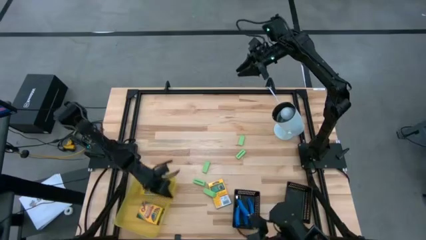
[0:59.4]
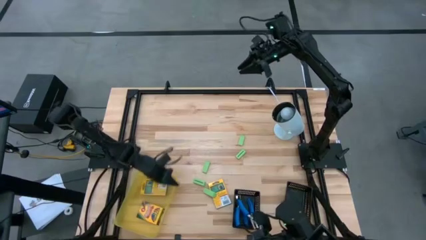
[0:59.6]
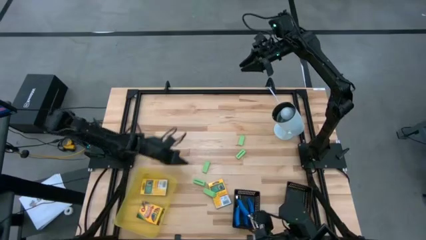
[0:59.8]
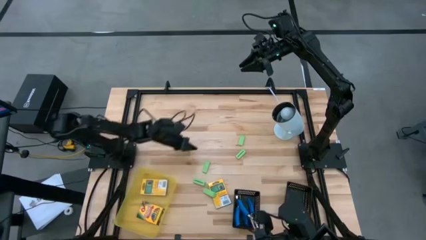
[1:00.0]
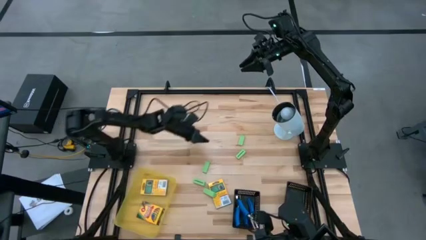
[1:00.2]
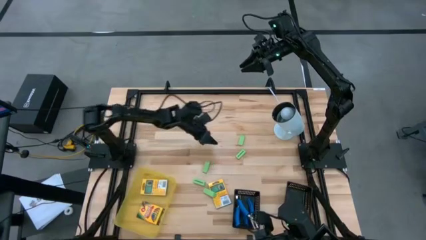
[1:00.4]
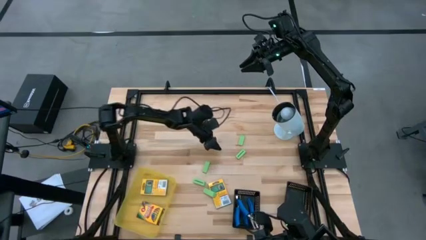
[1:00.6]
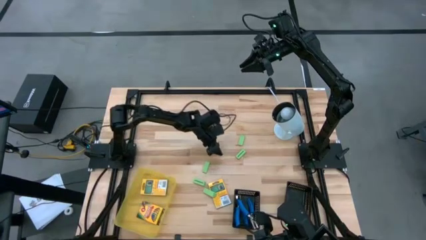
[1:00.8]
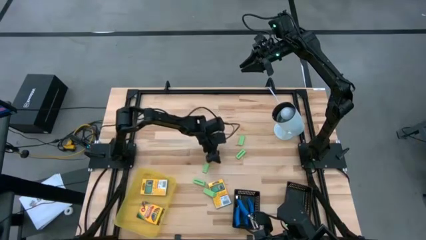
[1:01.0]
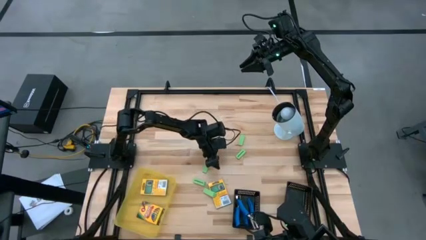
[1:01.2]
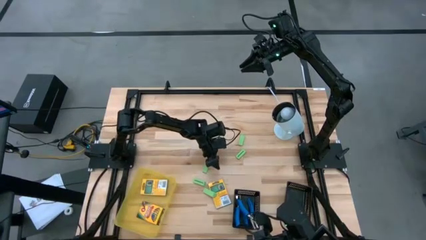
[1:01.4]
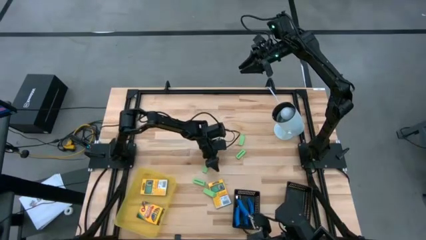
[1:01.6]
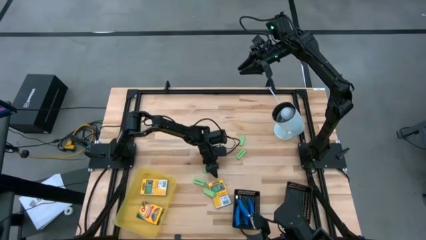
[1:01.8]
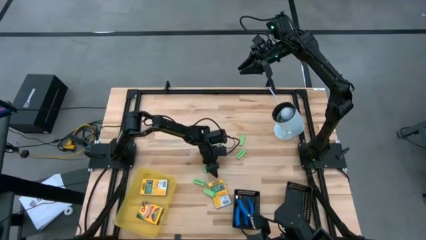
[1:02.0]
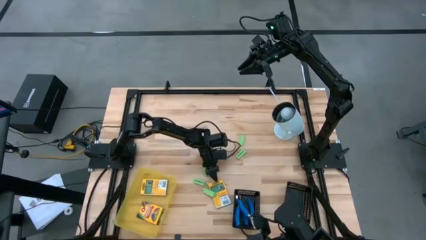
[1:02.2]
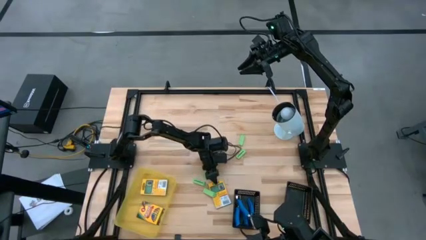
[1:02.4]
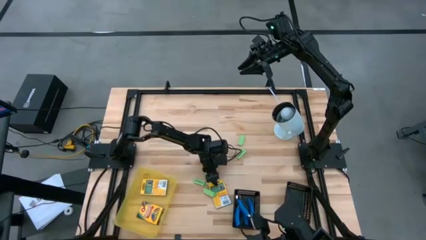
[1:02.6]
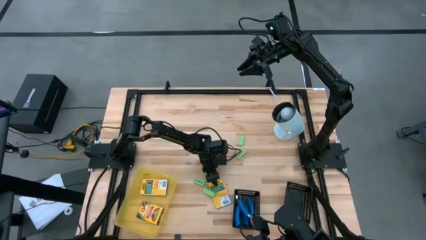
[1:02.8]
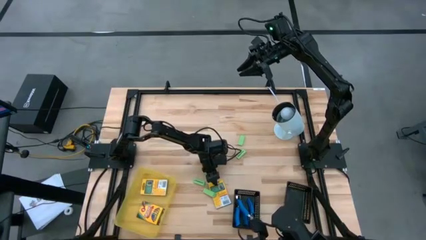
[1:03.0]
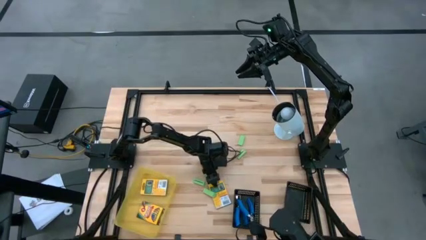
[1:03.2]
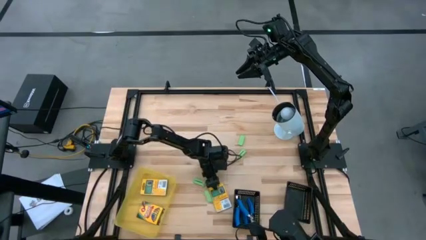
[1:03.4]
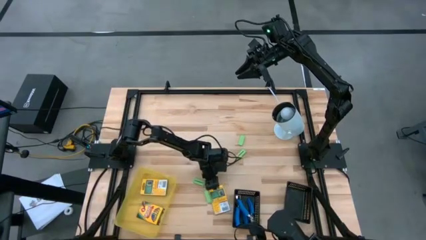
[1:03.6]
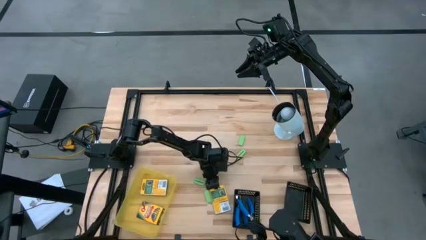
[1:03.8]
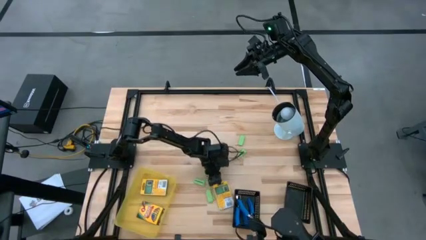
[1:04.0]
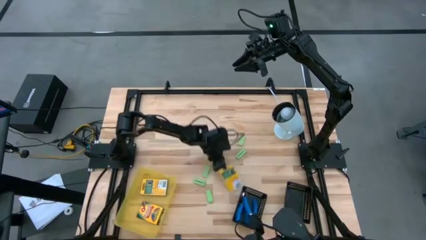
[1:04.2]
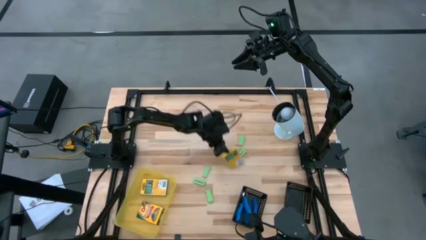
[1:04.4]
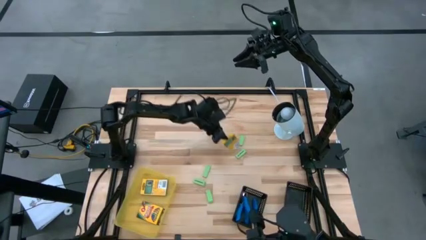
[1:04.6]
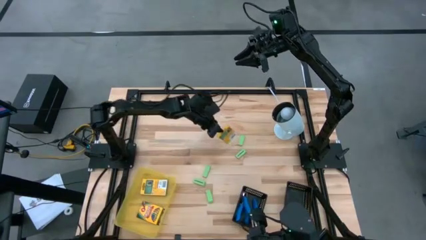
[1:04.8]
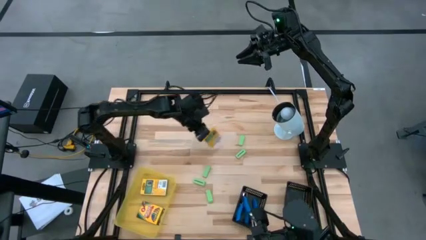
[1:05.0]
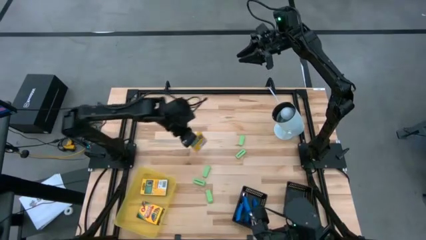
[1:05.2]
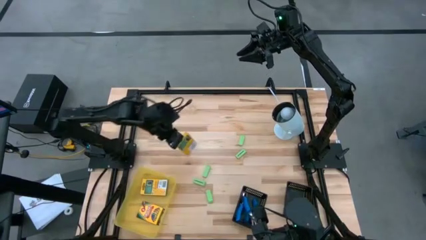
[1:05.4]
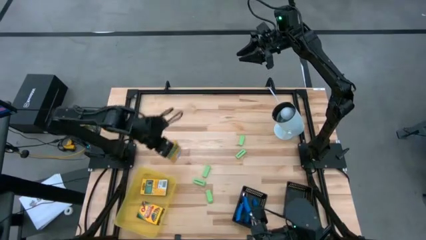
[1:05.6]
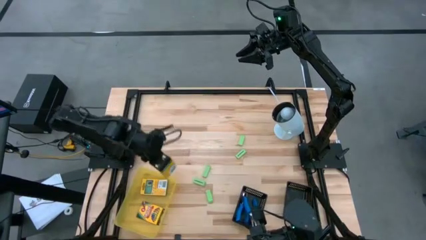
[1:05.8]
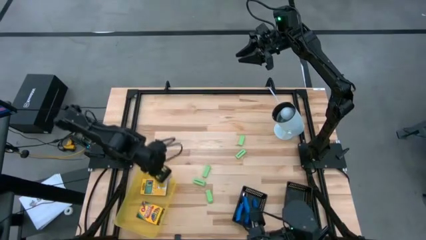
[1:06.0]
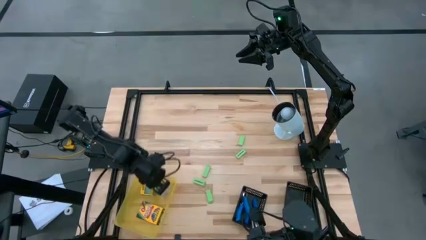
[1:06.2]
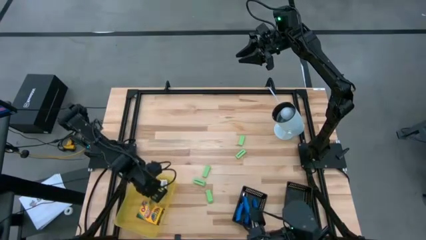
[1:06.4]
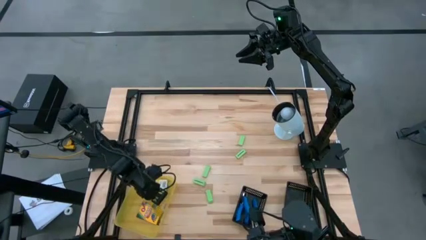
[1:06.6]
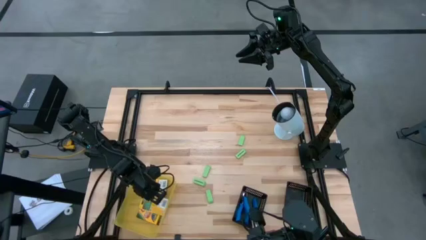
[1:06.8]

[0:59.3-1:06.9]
Task: Pick & Place School Supplies
Put the yellow crayon box into the yellow bin

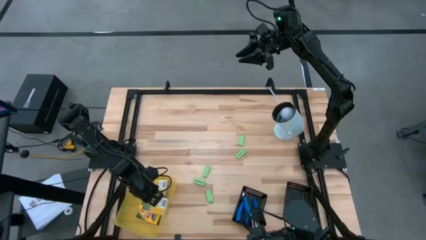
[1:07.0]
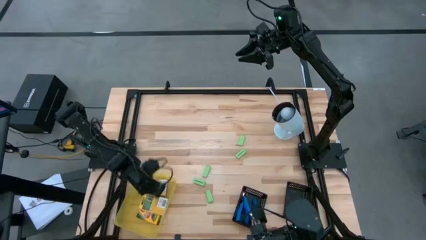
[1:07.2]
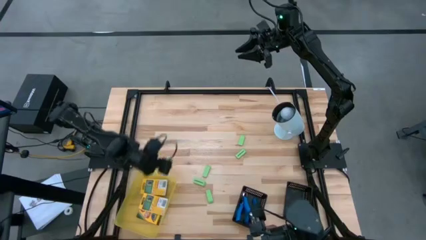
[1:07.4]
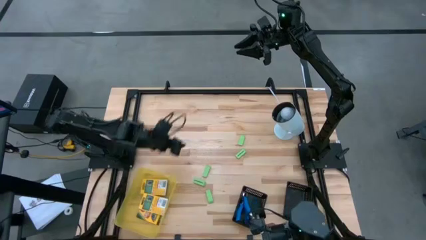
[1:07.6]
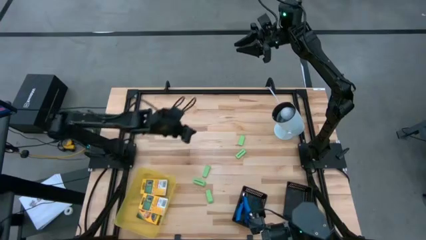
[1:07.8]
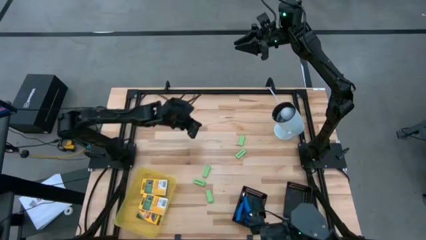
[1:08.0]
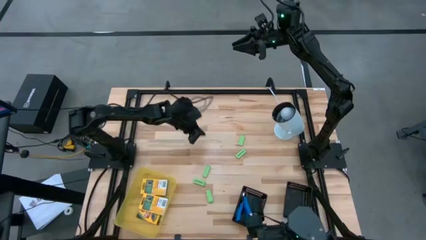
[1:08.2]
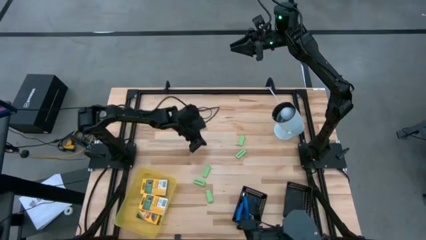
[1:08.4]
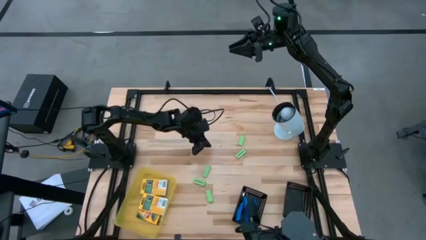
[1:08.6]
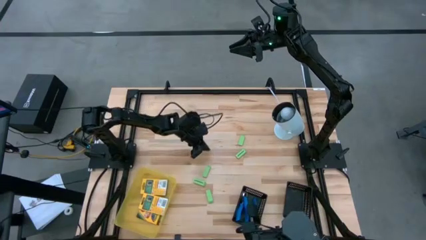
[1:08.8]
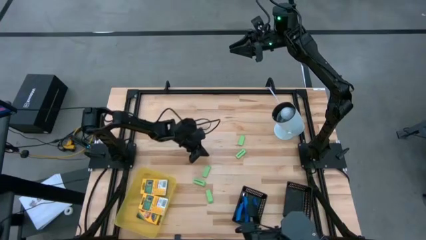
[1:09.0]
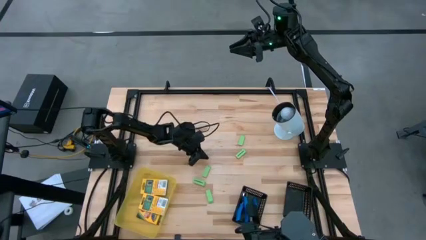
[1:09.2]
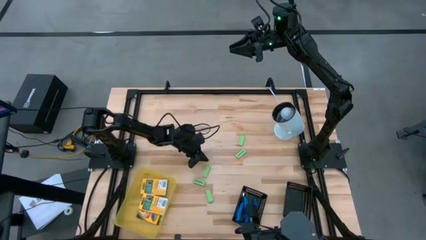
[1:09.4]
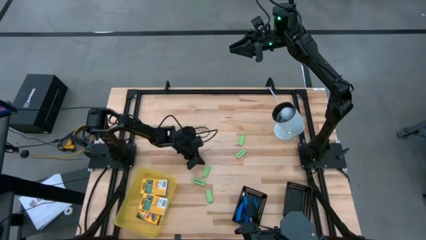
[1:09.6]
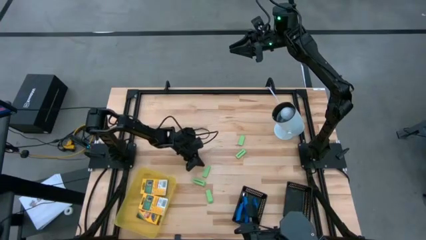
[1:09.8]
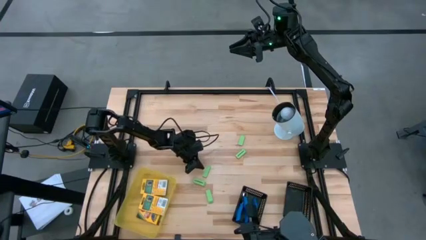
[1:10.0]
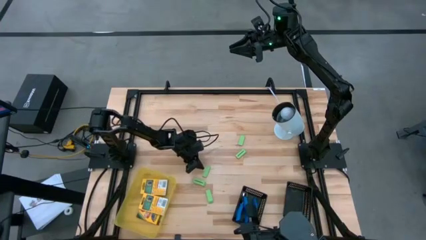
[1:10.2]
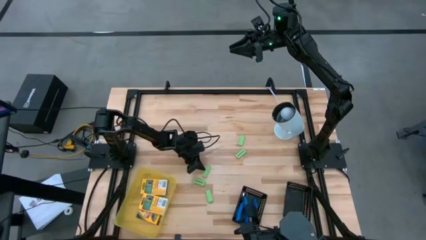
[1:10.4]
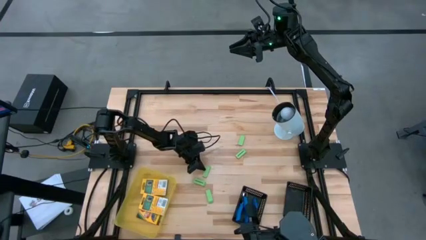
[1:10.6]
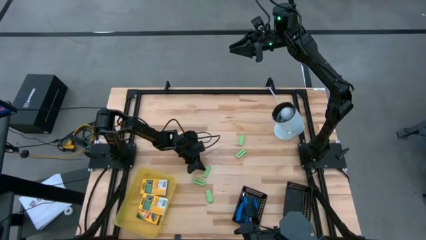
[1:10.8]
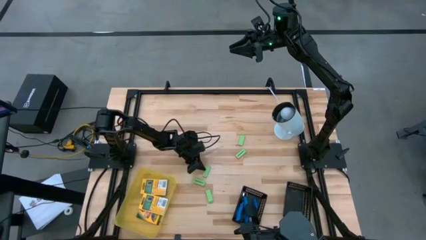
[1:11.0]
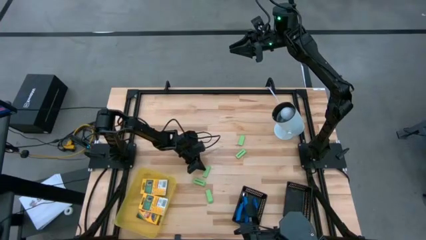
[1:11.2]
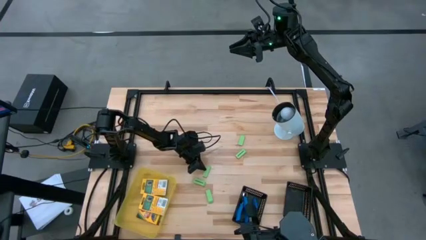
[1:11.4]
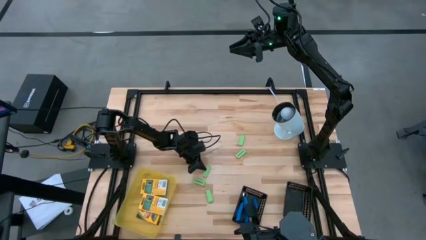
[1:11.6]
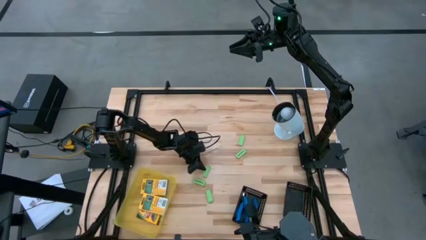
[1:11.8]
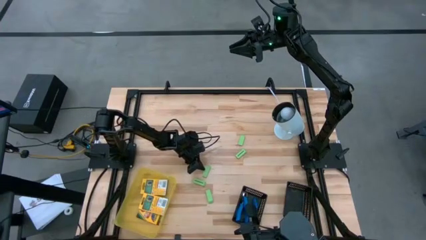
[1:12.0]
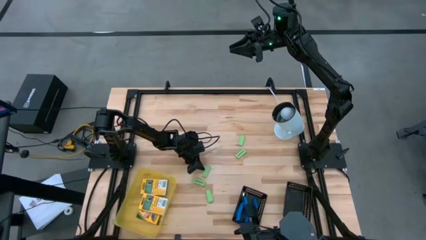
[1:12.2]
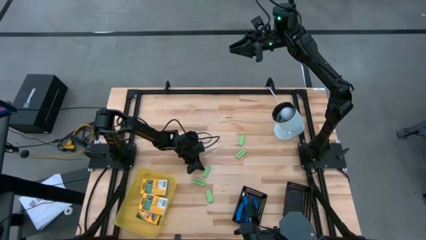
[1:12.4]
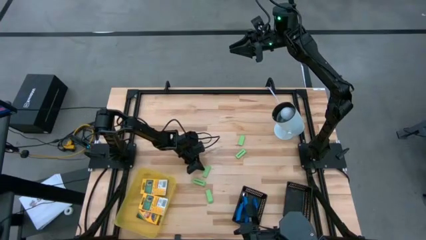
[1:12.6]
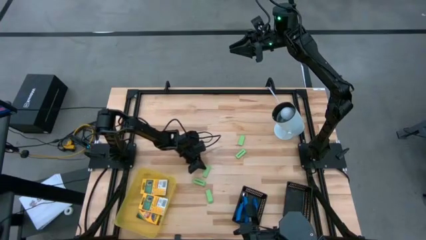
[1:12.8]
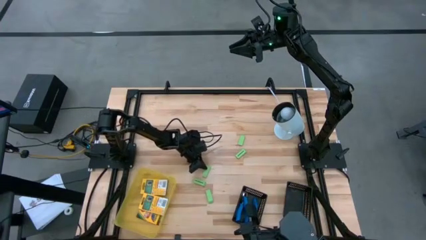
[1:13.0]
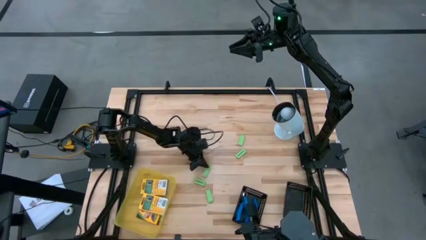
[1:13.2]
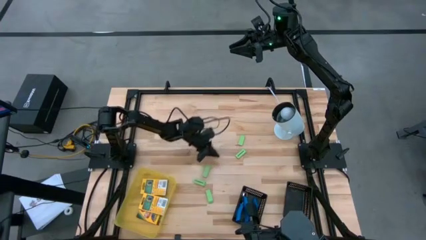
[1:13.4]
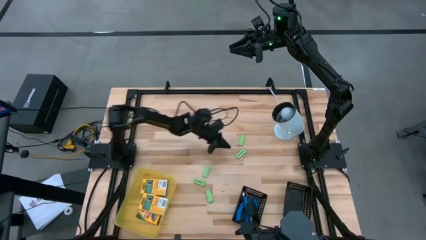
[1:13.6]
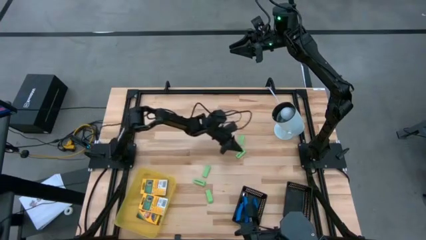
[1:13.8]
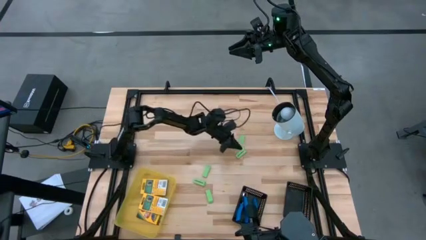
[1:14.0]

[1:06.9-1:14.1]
Put the green eraser into the right black bin

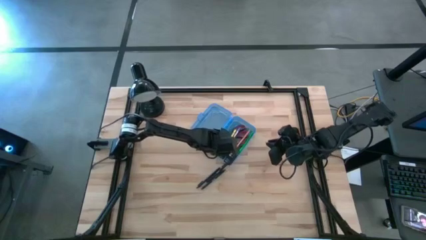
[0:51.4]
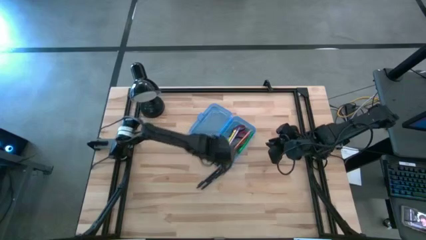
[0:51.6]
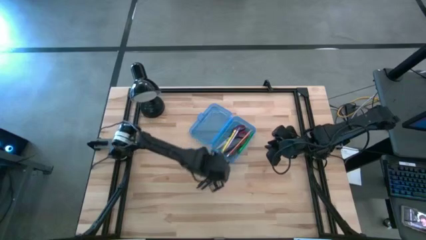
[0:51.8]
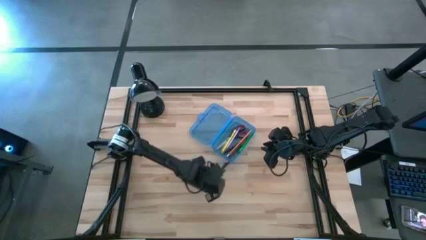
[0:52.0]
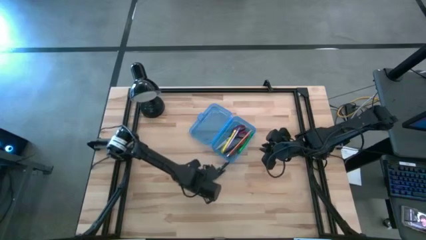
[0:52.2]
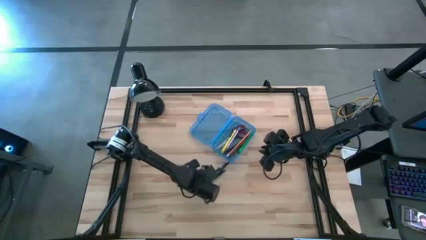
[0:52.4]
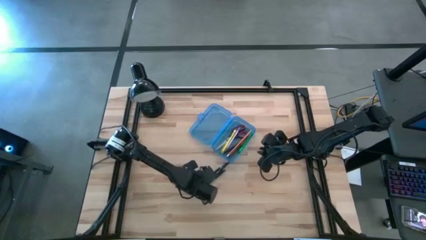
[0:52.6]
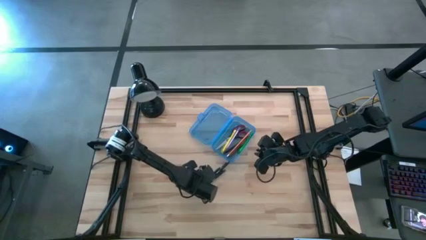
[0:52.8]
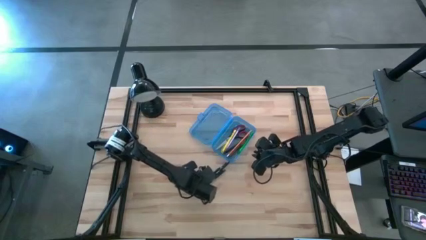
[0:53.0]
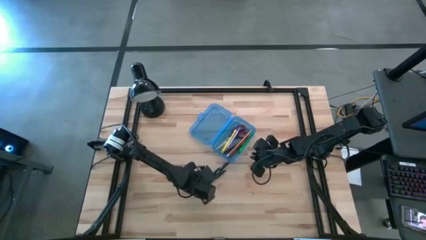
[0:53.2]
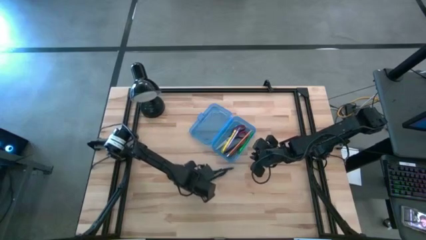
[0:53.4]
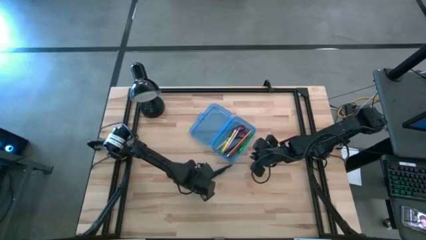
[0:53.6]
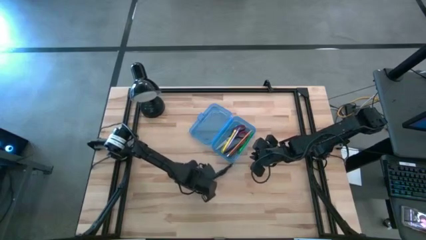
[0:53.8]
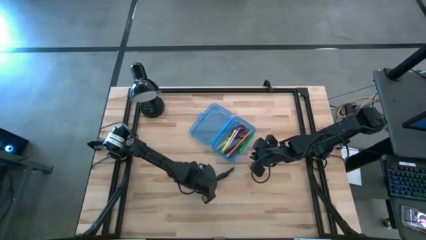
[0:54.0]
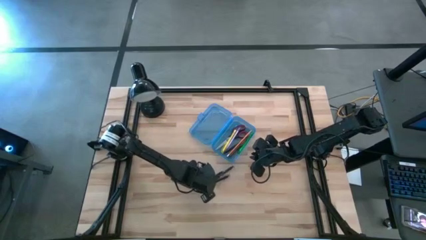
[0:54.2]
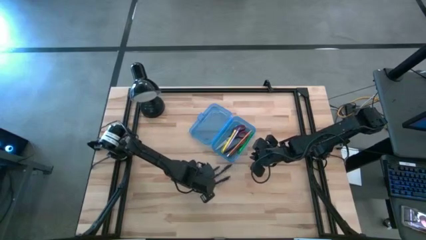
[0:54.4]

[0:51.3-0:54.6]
Task: Pick & place school supplies into a supply box
Put the top black pen into the blue supply box
